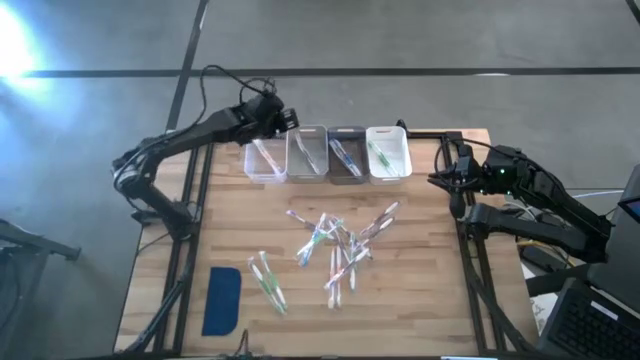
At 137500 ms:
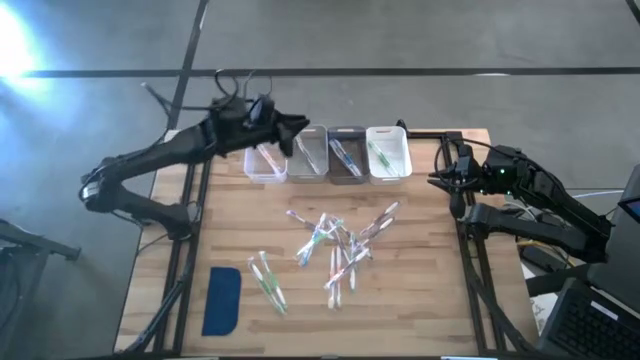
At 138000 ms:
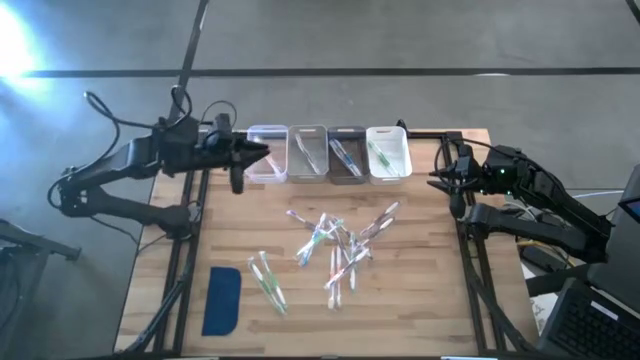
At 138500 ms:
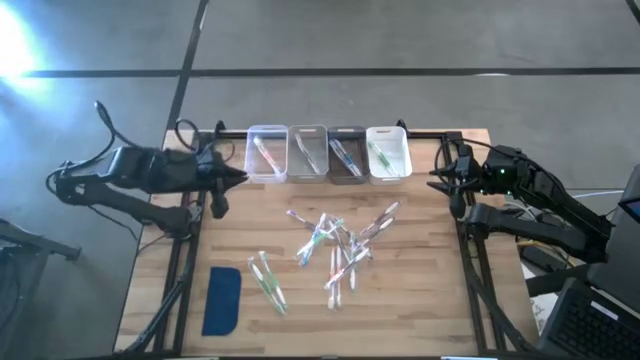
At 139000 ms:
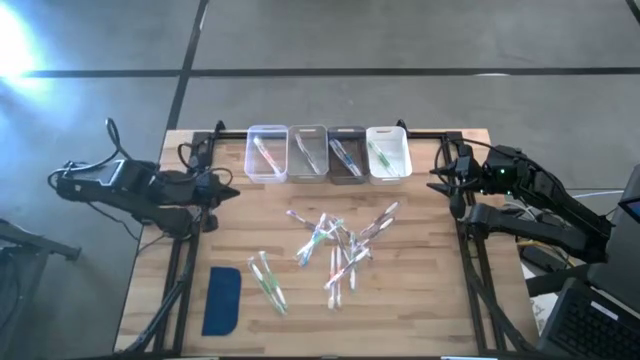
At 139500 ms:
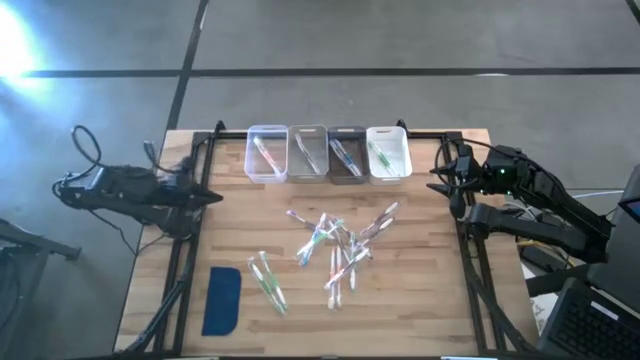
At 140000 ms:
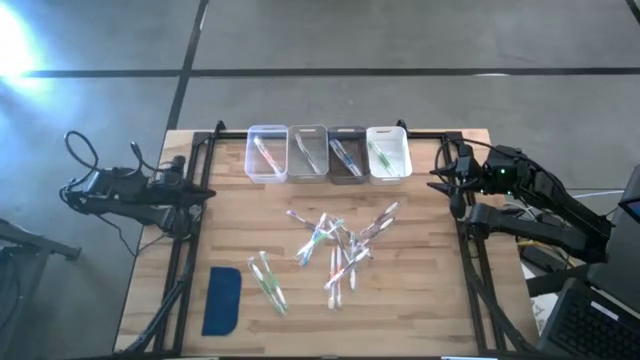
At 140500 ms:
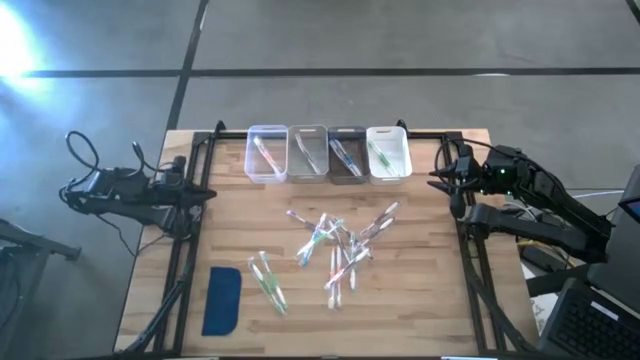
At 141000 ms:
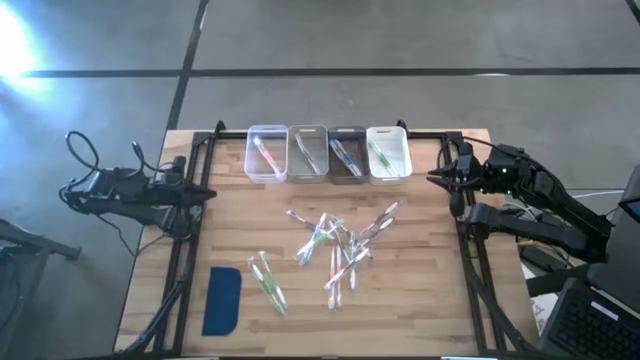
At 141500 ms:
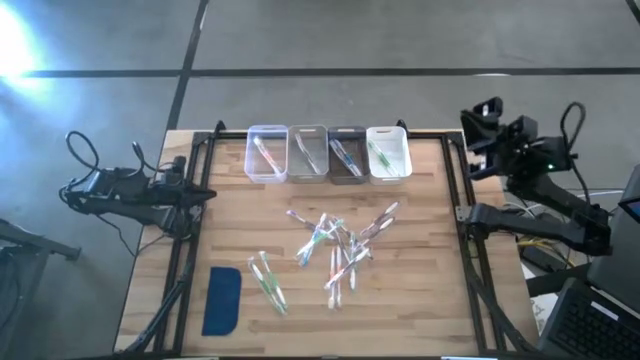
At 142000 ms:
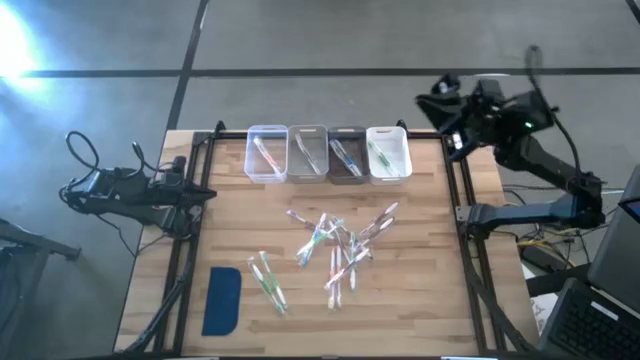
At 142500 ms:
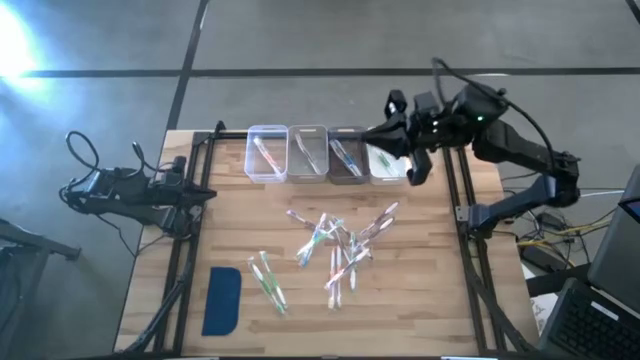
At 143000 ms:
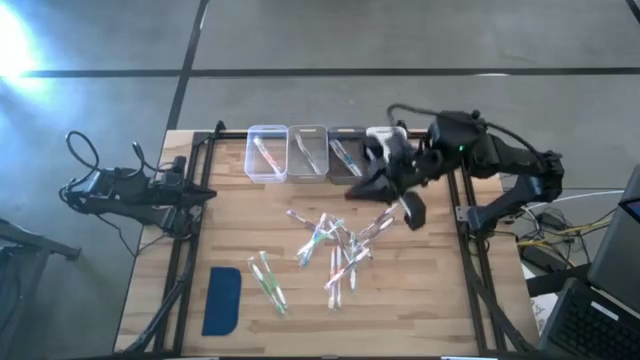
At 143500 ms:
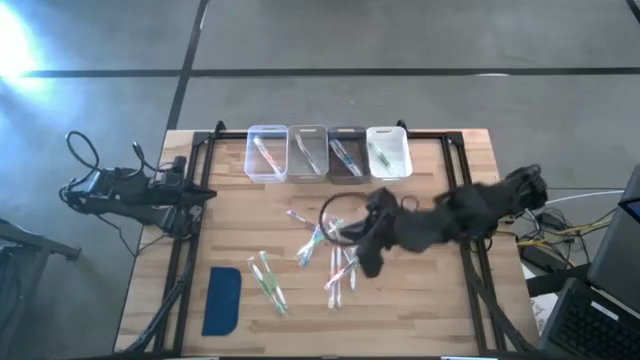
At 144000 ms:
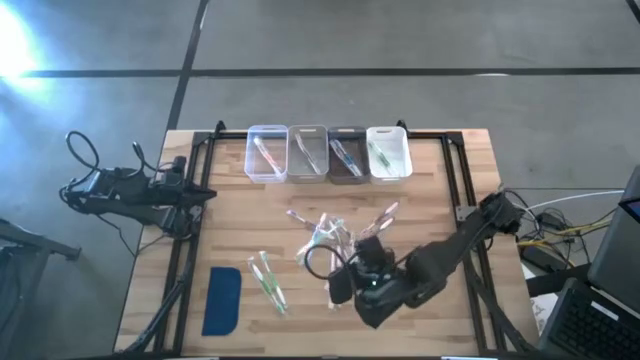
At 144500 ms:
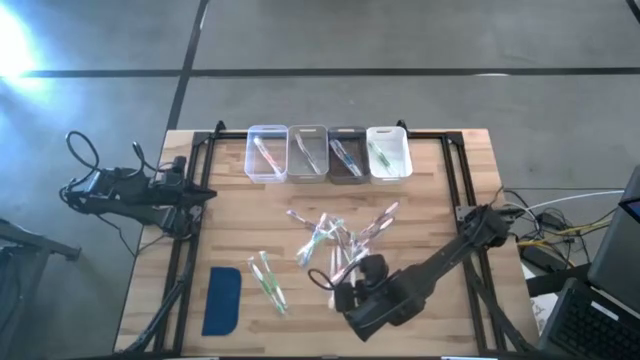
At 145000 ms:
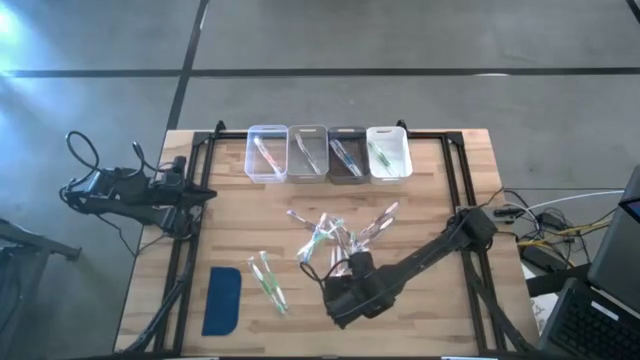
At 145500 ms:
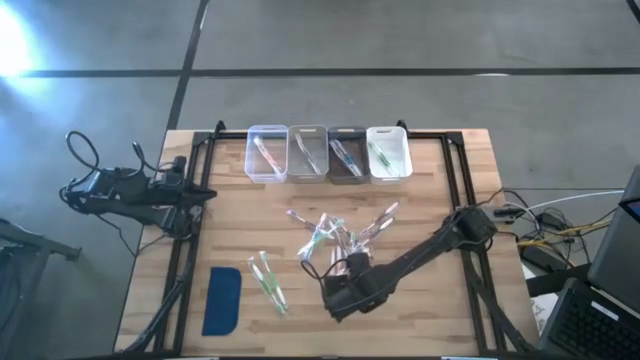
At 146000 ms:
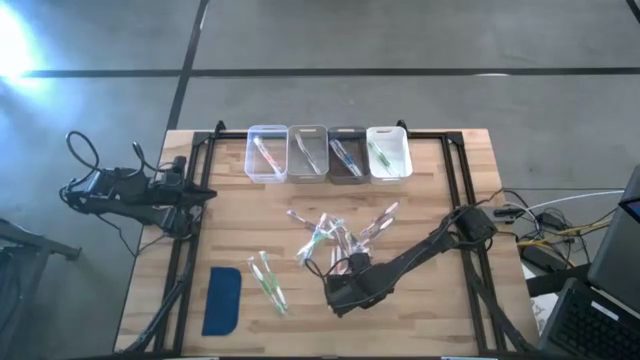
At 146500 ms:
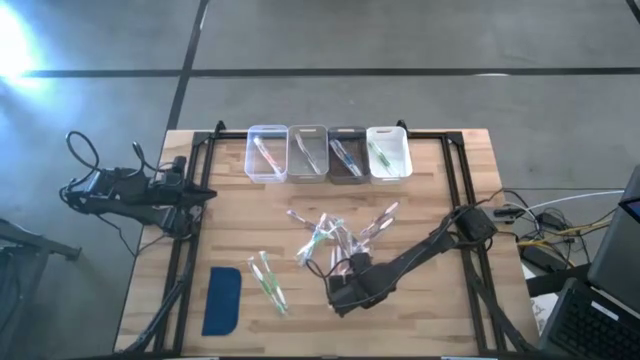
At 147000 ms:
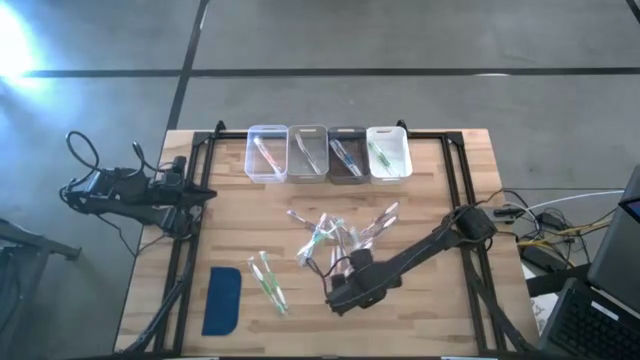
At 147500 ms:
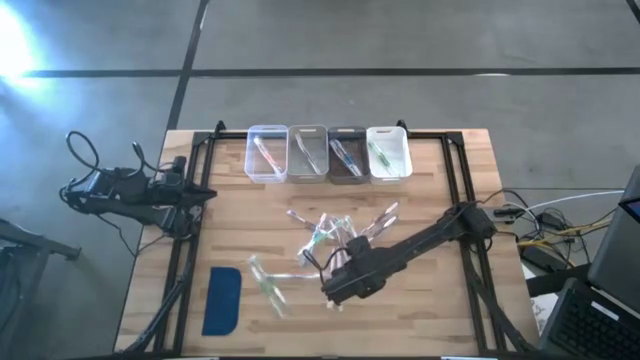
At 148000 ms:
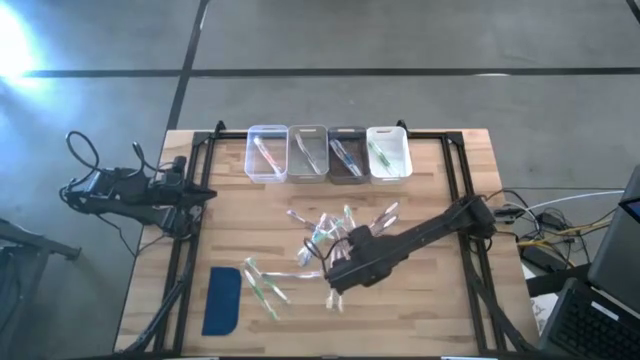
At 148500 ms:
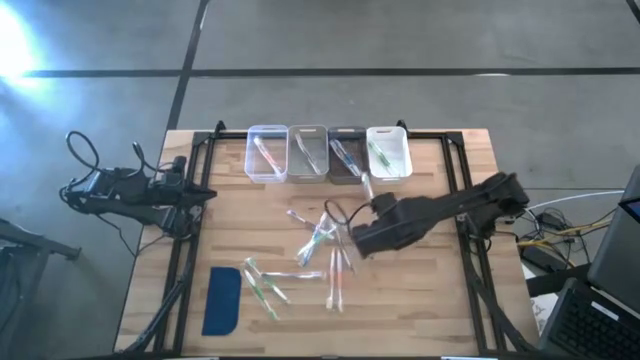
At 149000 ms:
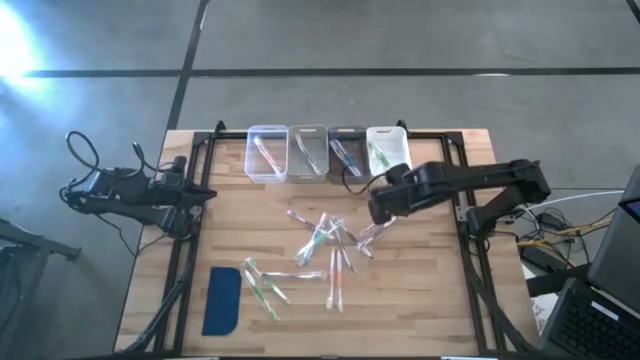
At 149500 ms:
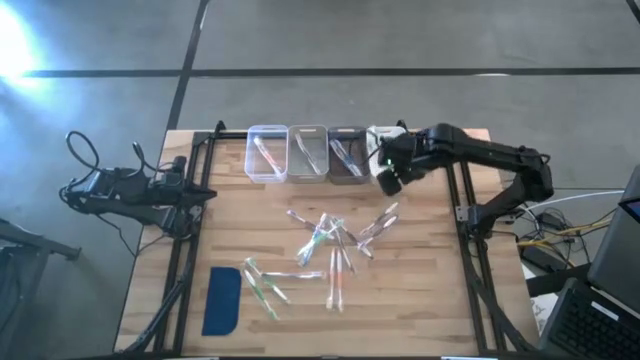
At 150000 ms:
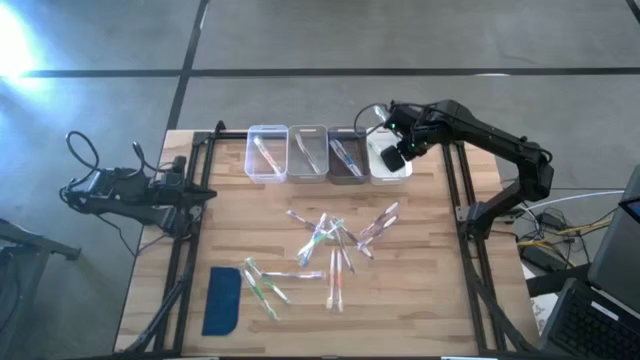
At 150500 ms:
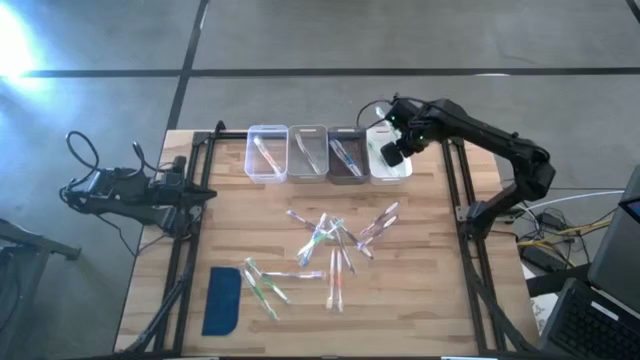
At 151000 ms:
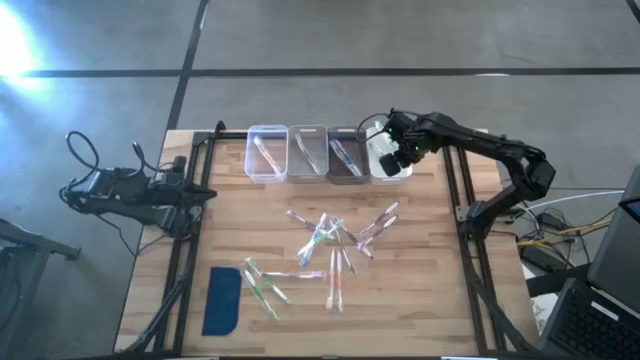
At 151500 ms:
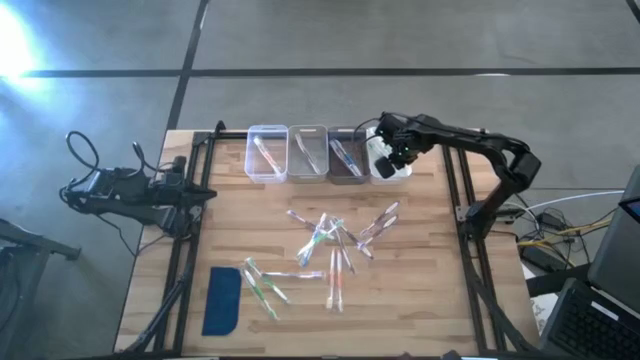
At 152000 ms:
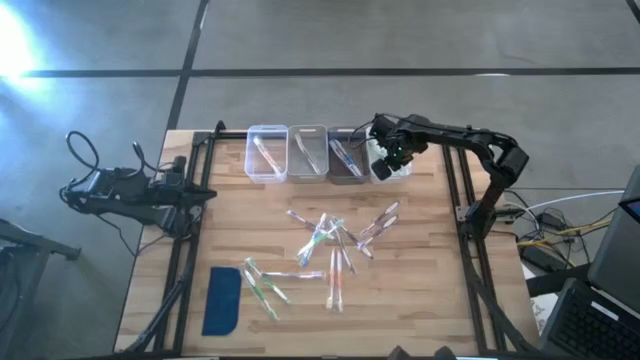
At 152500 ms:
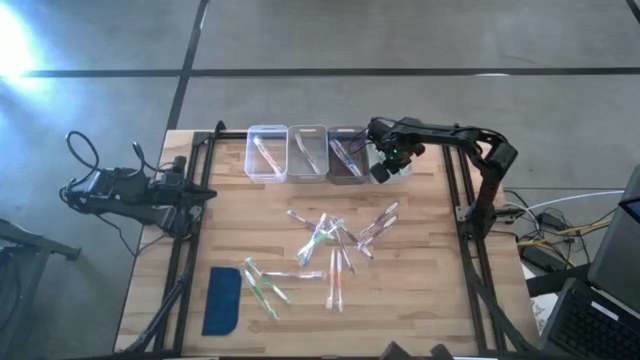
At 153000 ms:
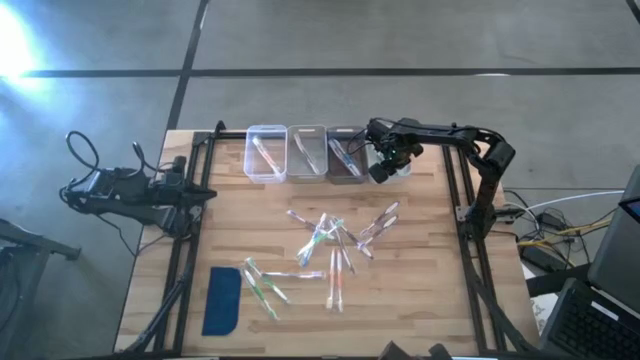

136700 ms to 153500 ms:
Task: Pick & Place Toothbrushes
Put the green toothbrush into the white bin

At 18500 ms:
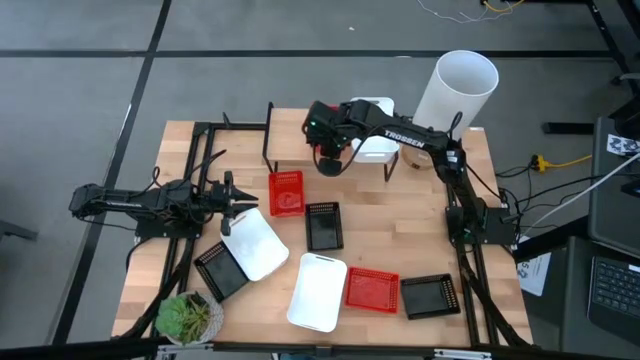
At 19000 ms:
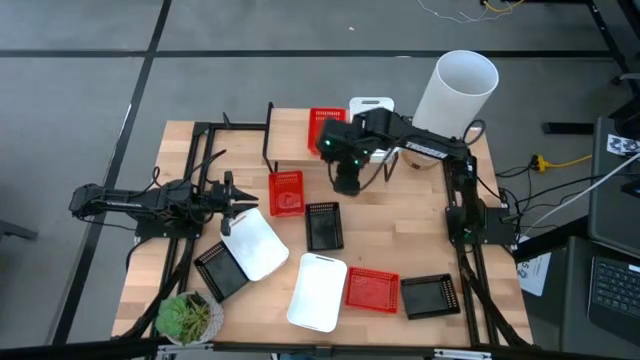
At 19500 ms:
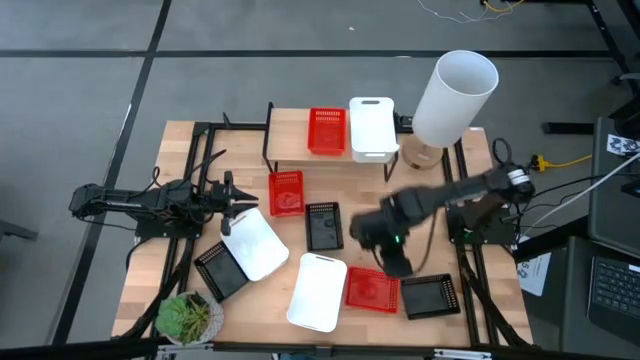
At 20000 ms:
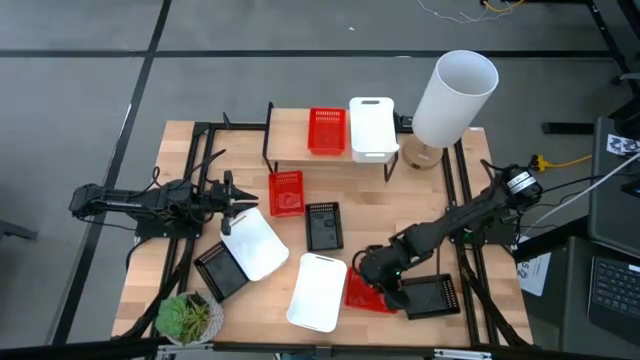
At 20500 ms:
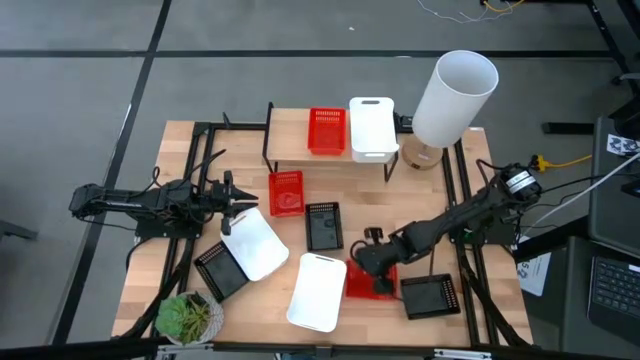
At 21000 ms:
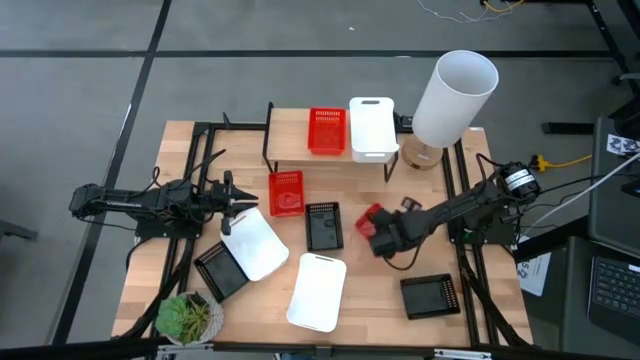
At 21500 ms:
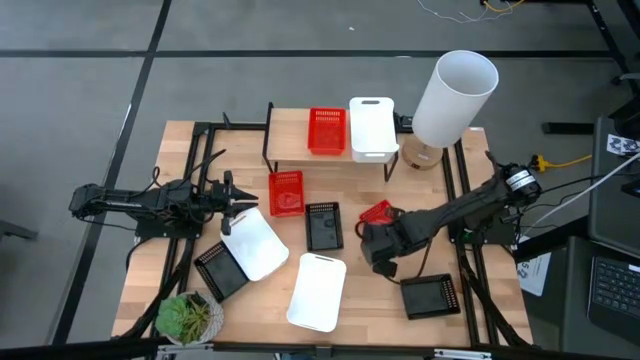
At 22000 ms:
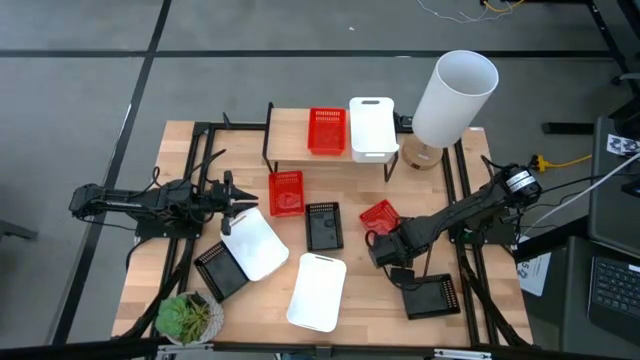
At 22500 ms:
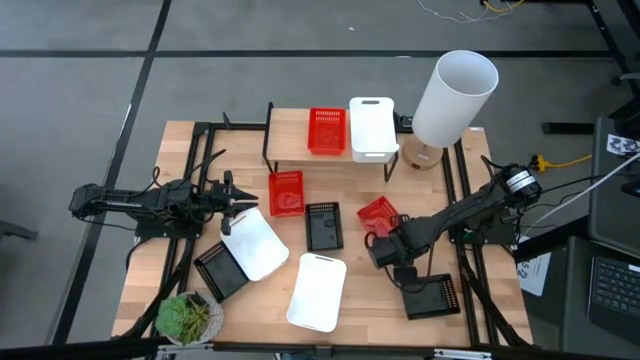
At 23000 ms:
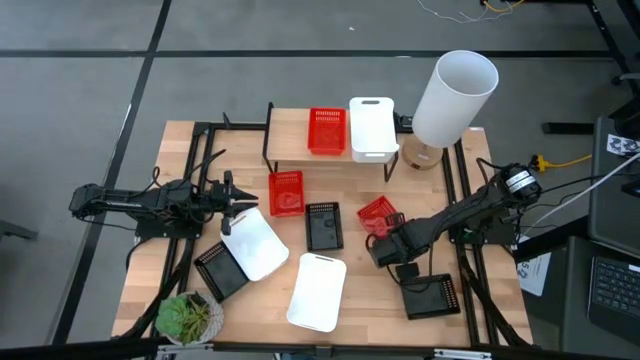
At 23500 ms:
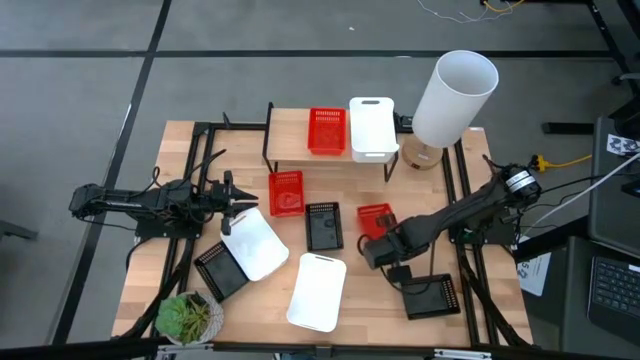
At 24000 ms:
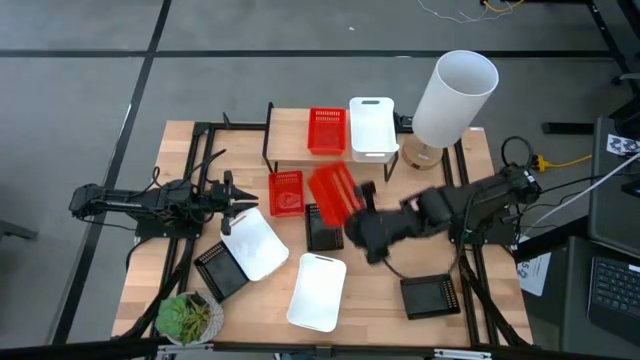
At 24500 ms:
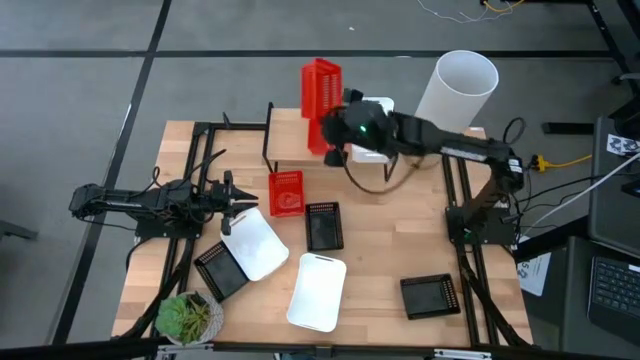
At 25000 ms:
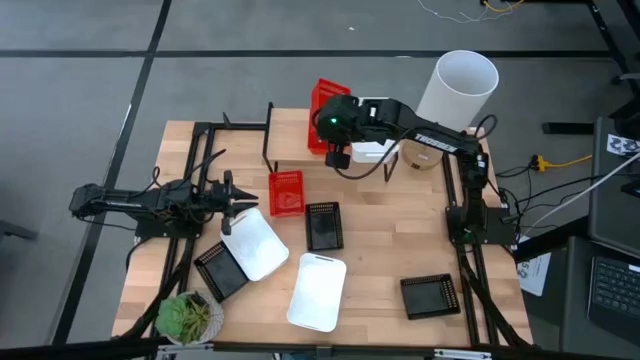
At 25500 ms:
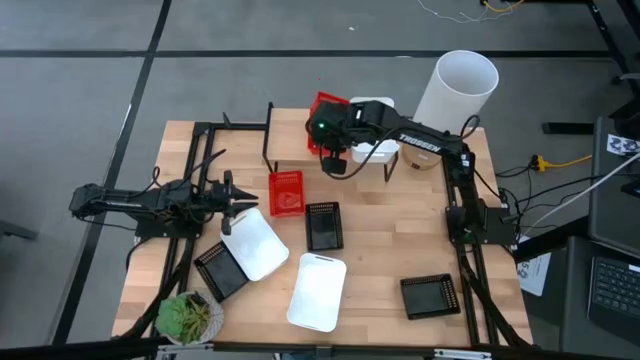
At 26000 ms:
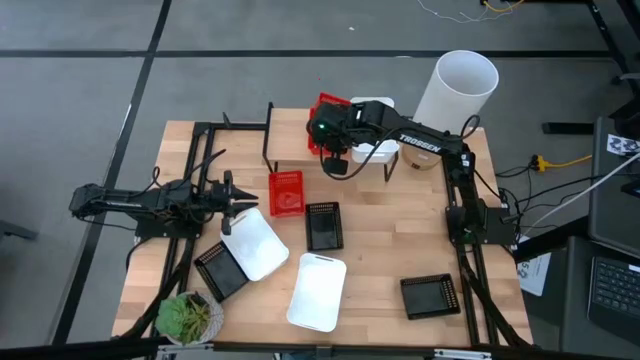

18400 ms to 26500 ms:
Task: Stack baskets on shelf by color
Stack the bottom red bin on top of the red bin on the shelf
